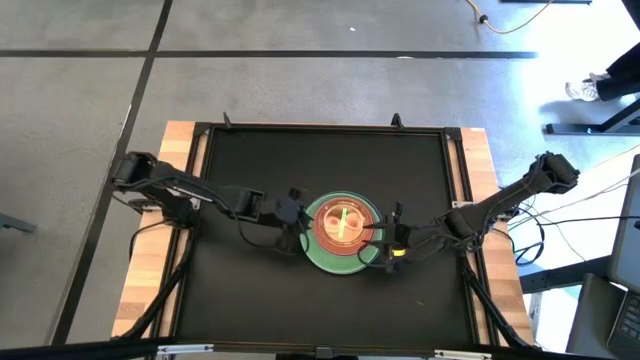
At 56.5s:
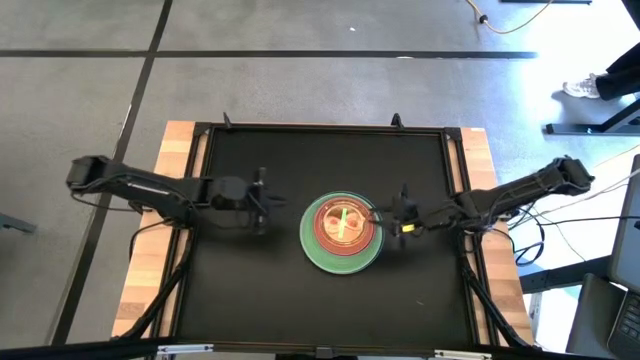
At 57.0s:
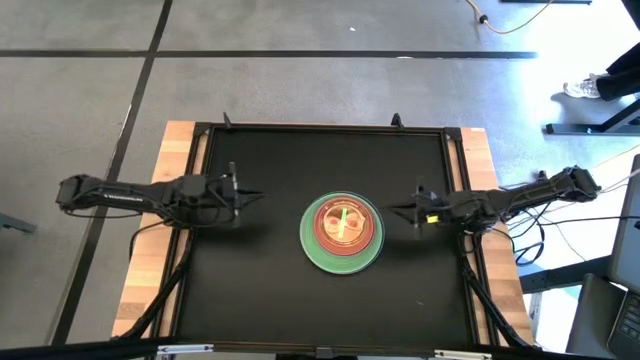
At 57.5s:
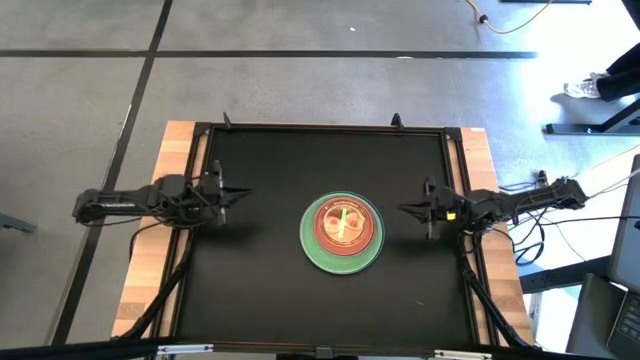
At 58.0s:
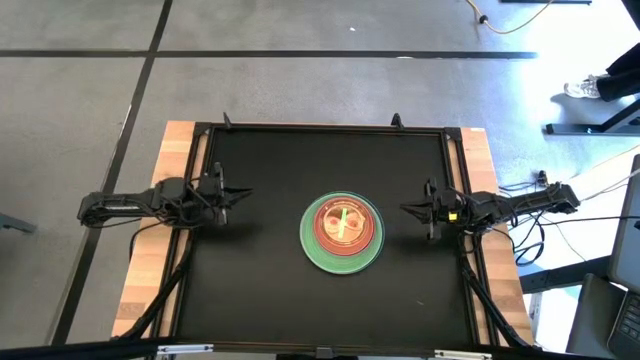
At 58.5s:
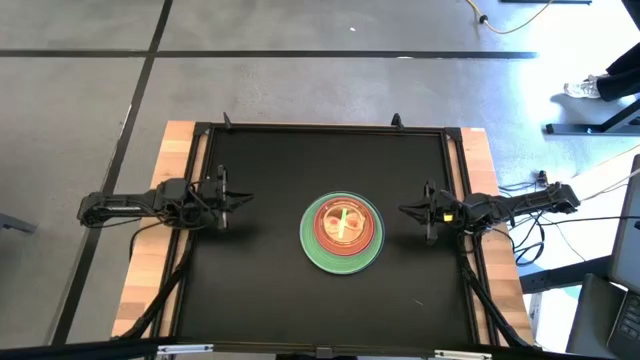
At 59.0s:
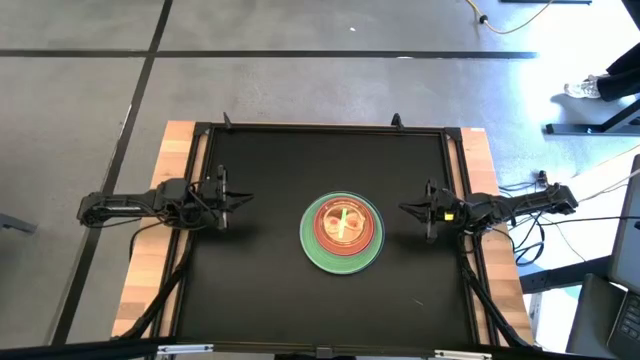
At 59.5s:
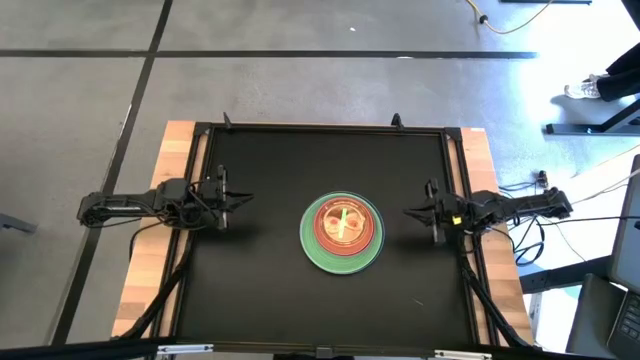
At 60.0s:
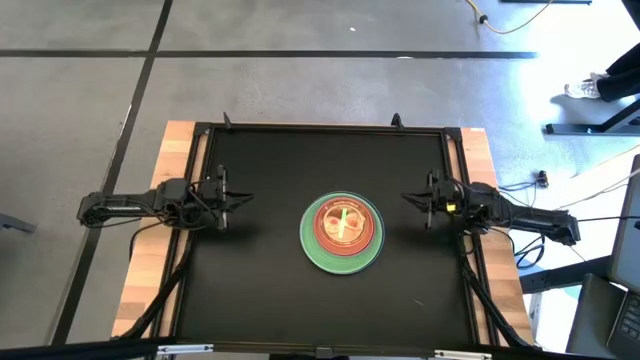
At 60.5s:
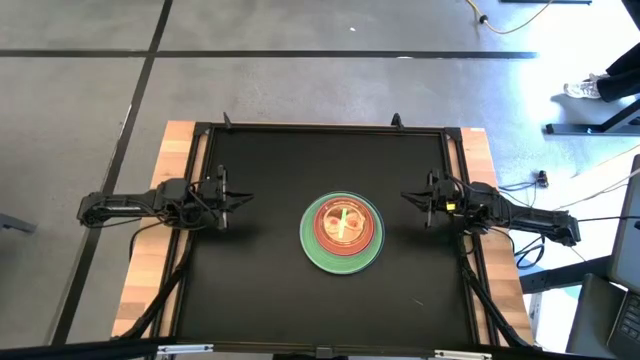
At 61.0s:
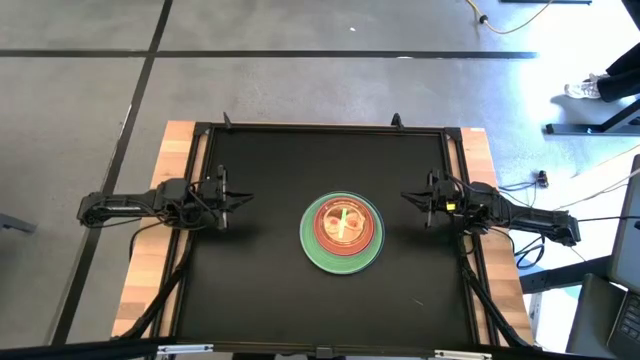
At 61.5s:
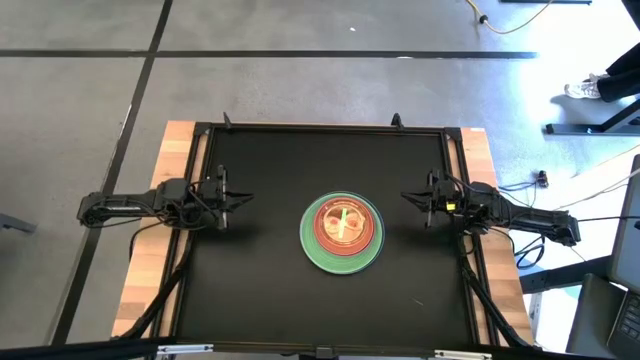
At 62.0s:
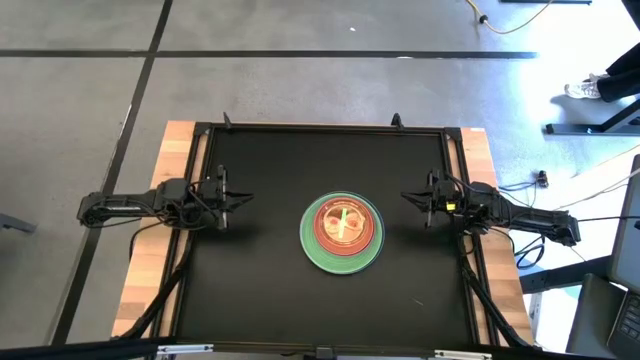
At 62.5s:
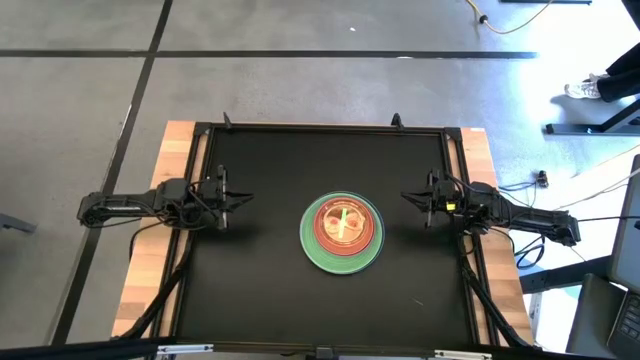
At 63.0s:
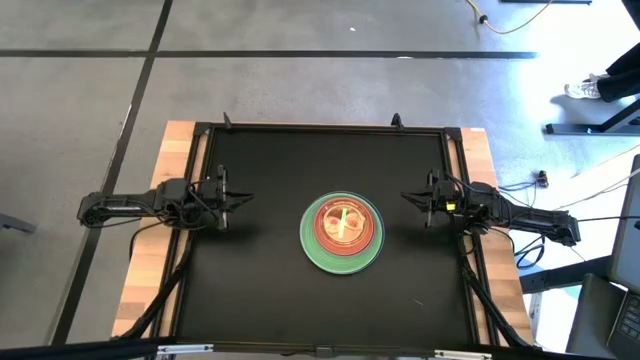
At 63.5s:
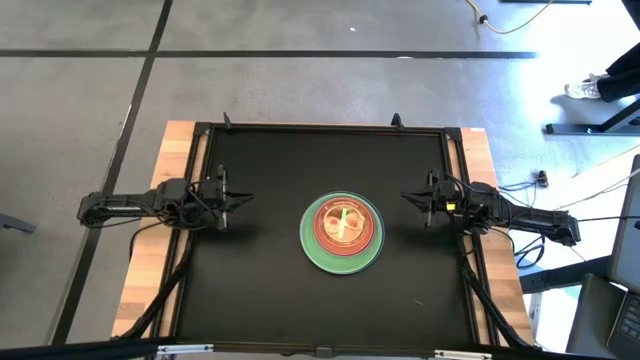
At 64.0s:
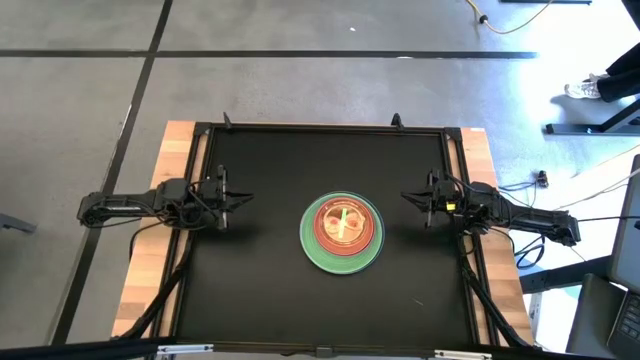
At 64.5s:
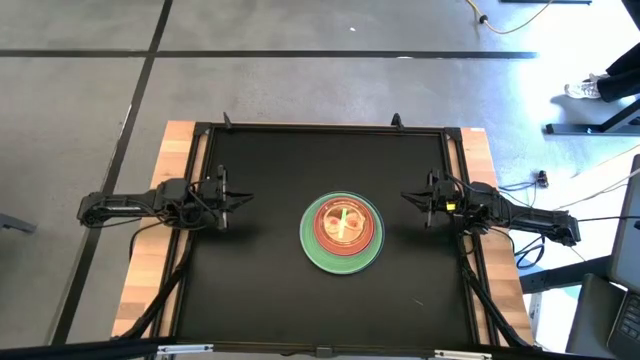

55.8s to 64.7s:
Task: Stack plastic plates
Return to Home Position

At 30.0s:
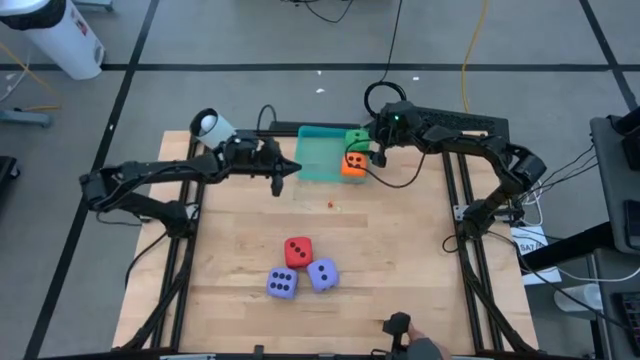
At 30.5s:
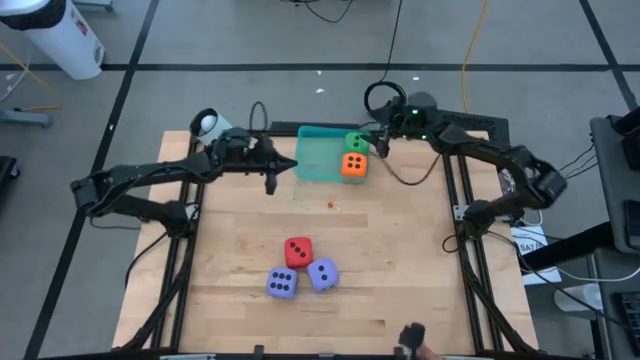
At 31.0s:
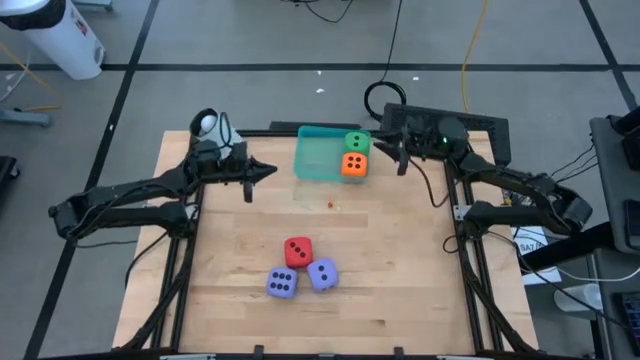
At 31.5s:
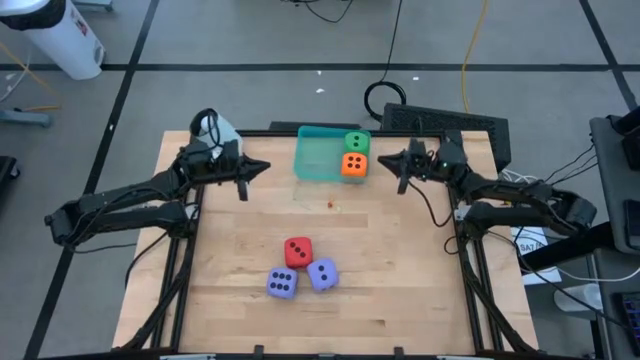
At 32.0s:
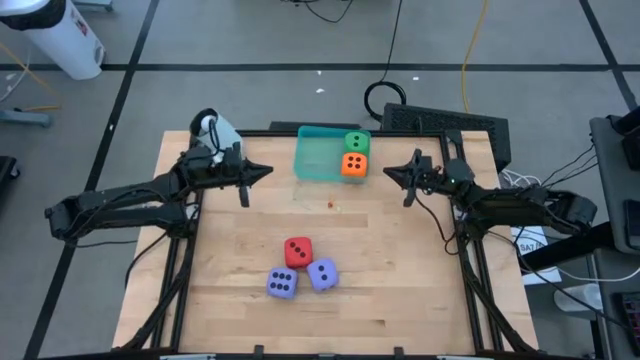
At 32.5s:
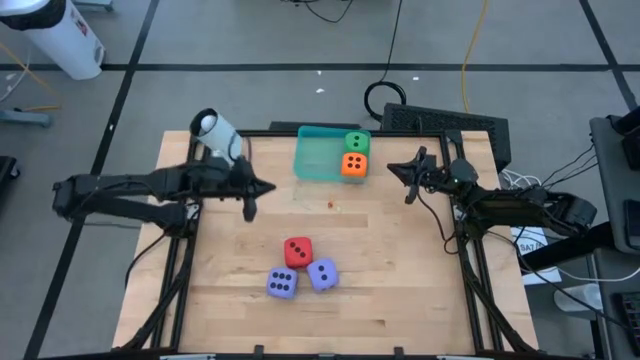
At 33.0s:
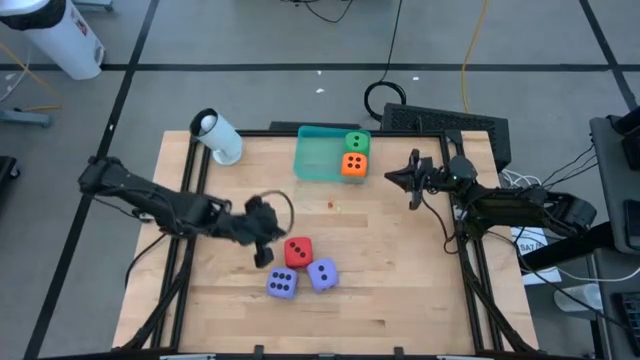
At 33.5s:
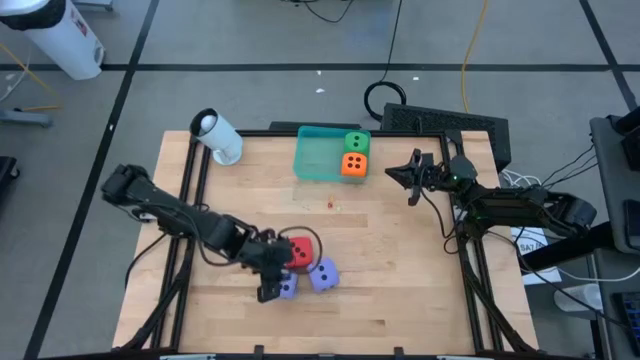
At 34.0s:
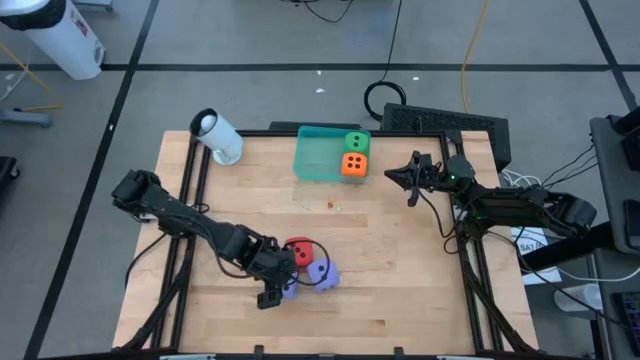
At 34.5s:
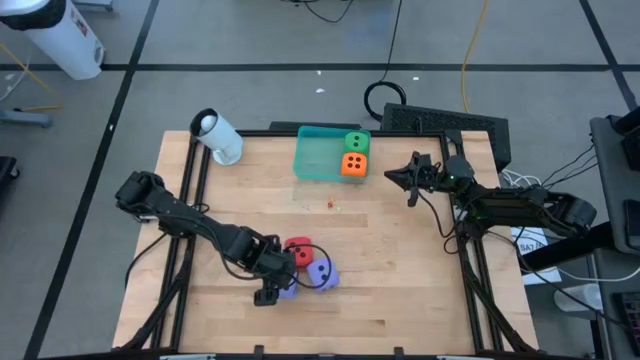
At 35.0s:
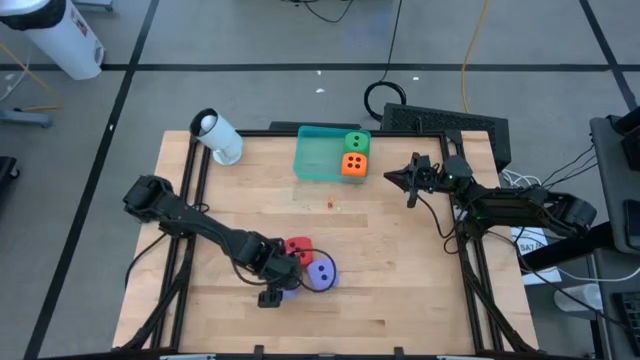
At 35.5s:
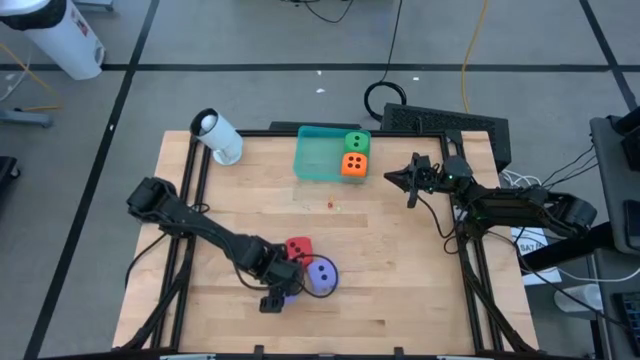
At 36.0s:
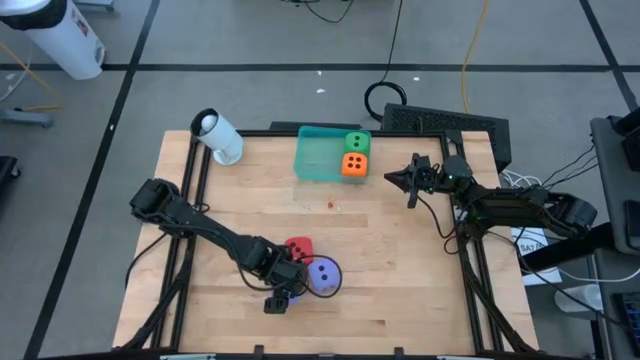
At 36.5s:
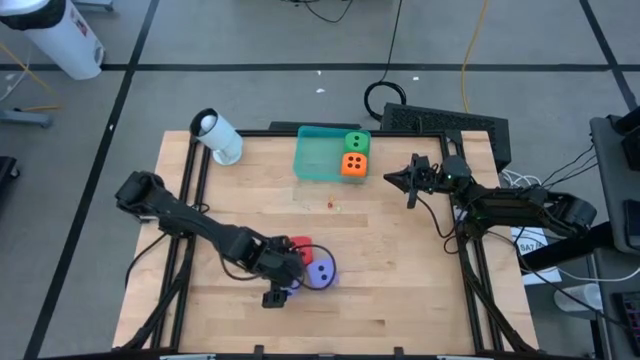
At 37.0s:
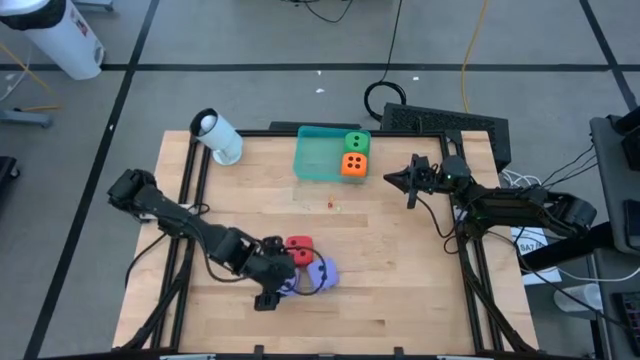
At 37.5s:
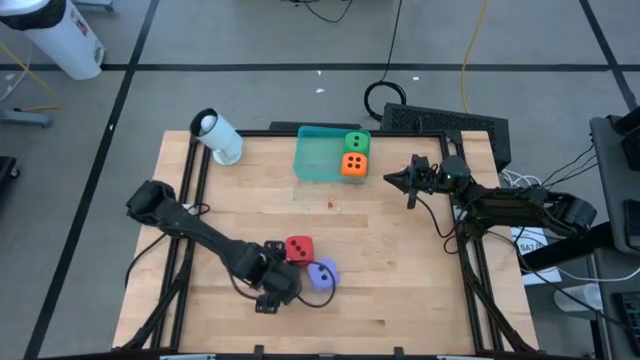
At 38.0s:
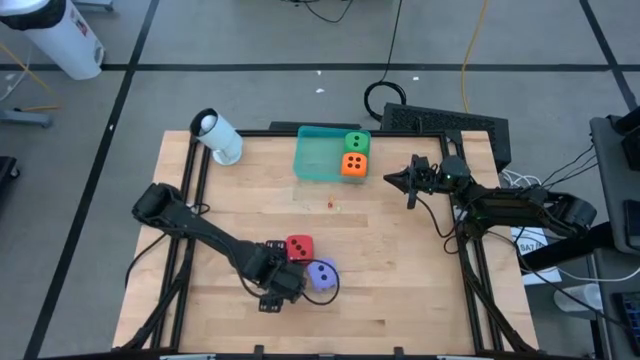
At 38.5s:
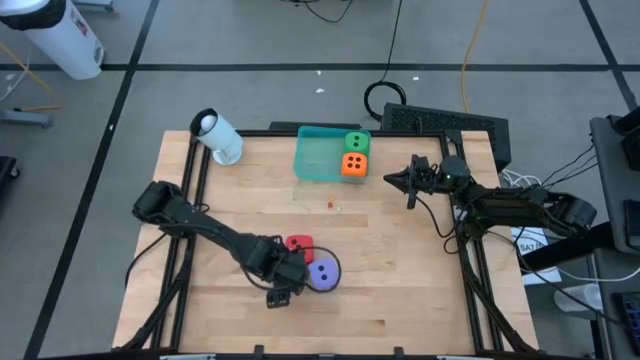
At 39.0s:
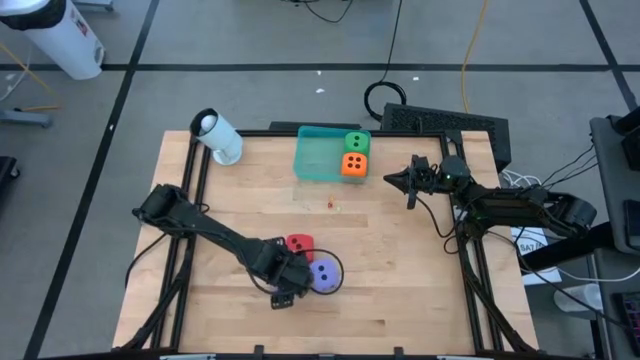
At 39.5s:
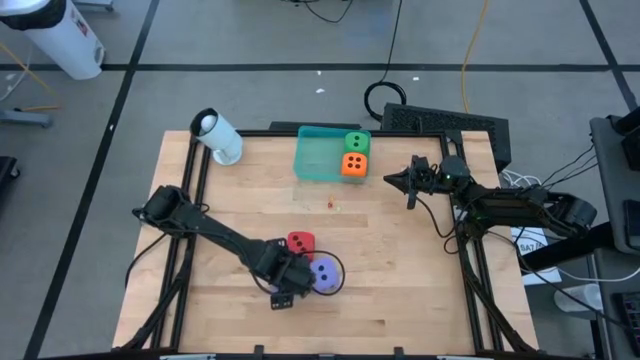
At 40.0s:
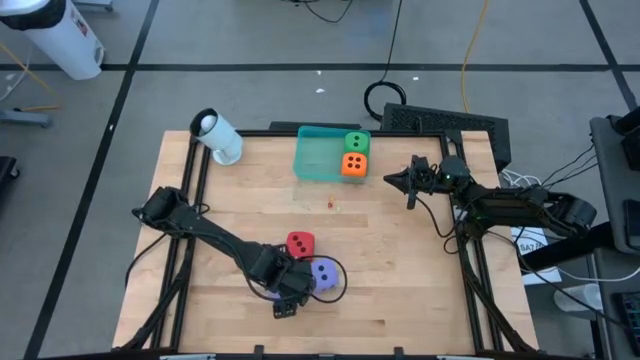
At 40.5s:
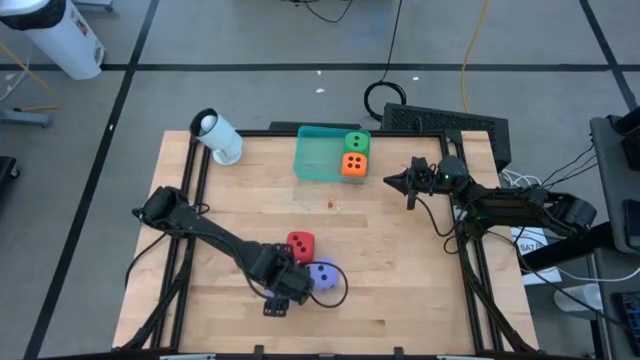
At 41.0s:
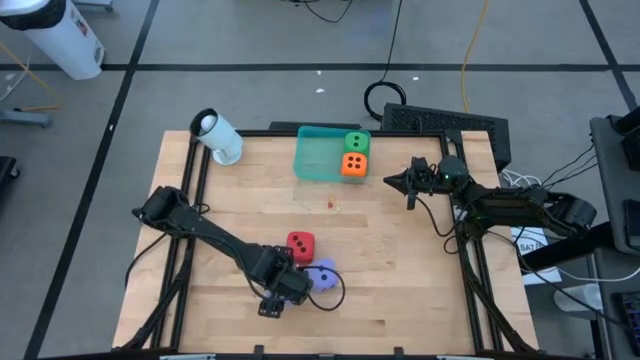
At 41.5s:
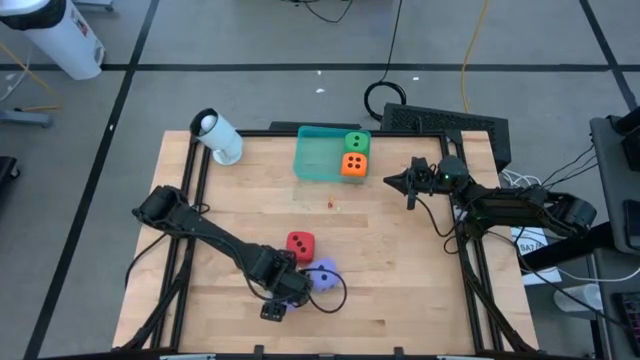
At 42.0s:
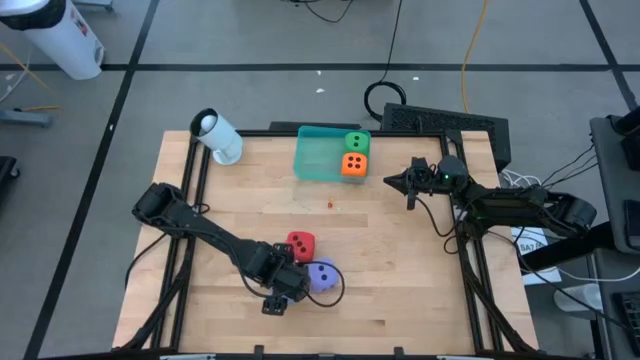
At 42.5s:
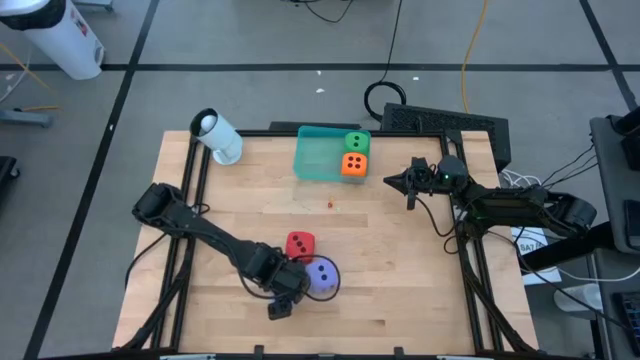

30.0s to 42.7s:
Task: Pick & Place Dice
Put the left large violet die into the blue bin
